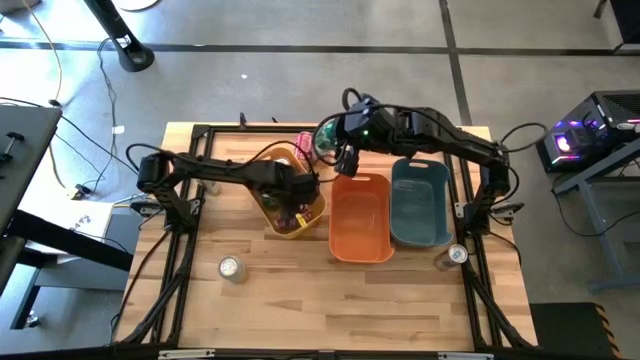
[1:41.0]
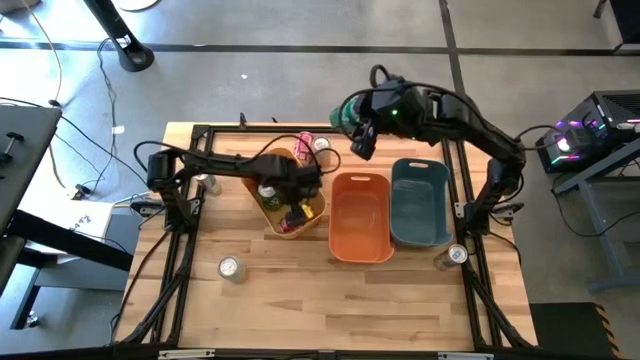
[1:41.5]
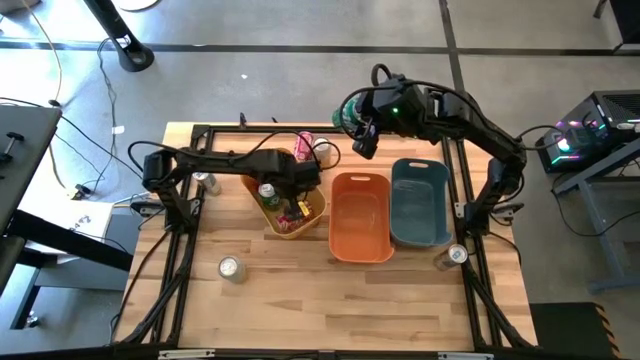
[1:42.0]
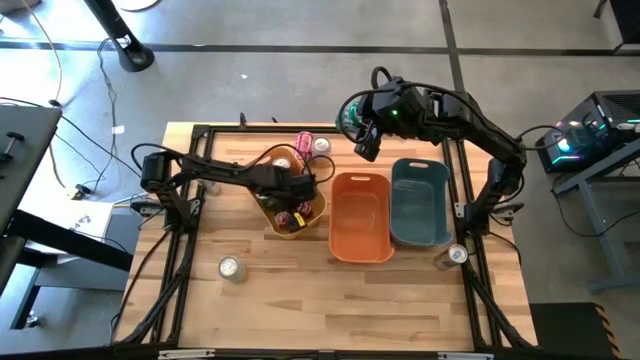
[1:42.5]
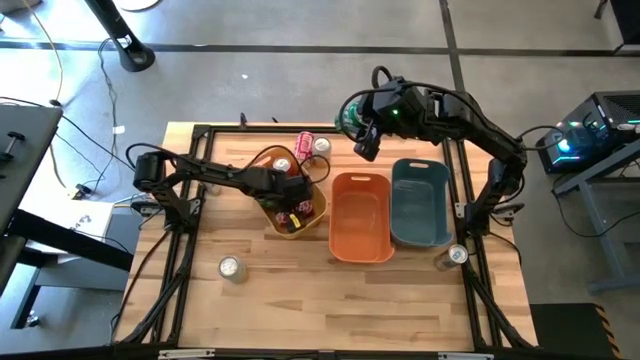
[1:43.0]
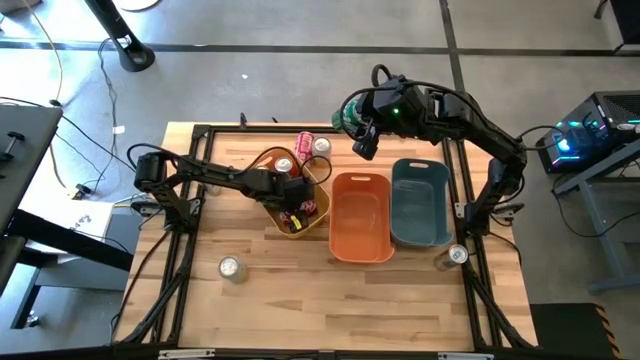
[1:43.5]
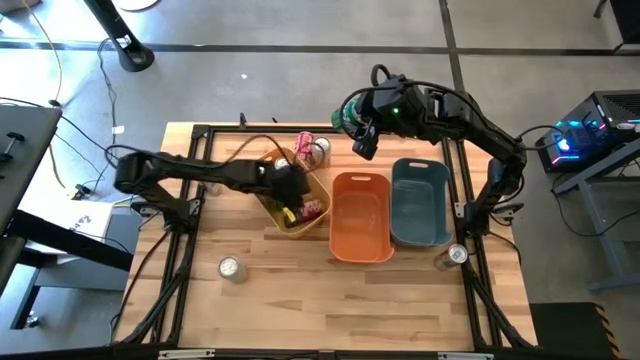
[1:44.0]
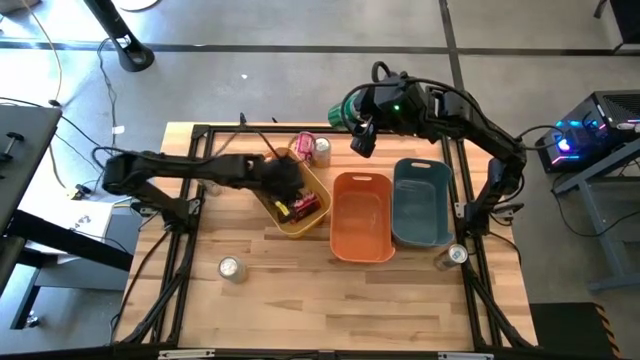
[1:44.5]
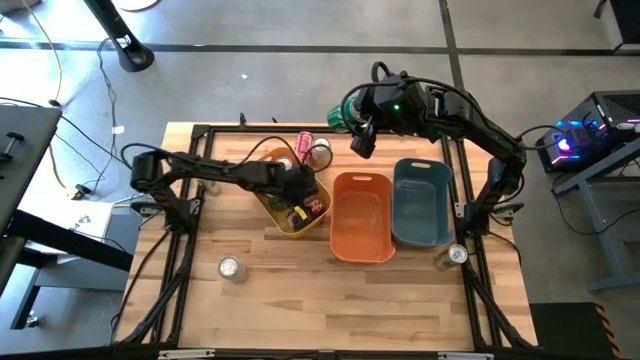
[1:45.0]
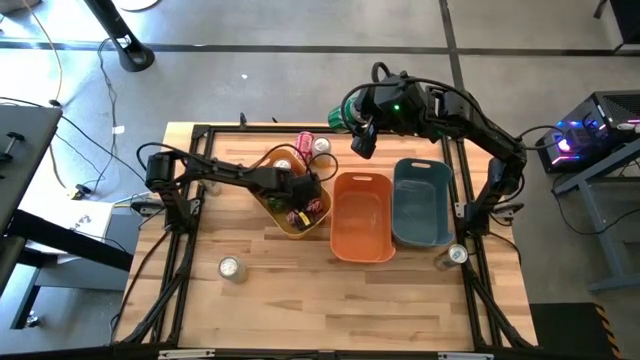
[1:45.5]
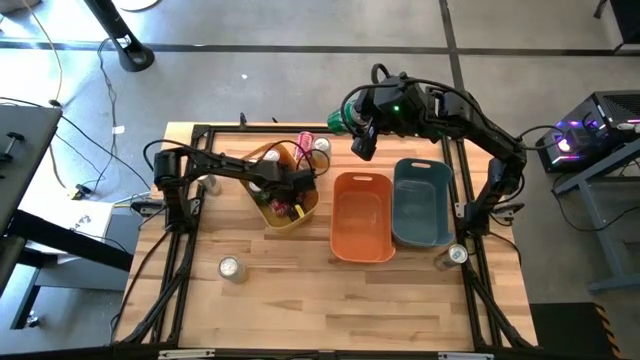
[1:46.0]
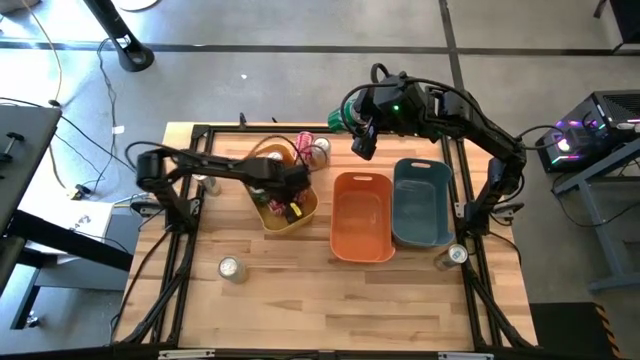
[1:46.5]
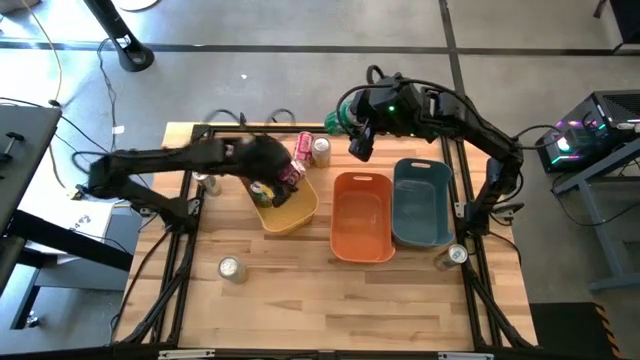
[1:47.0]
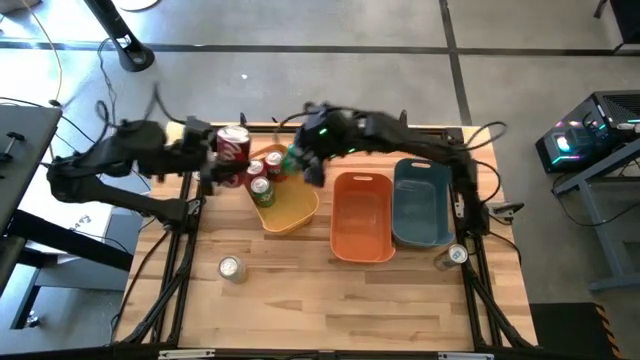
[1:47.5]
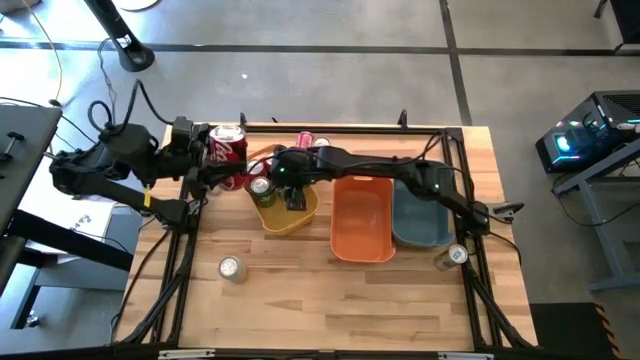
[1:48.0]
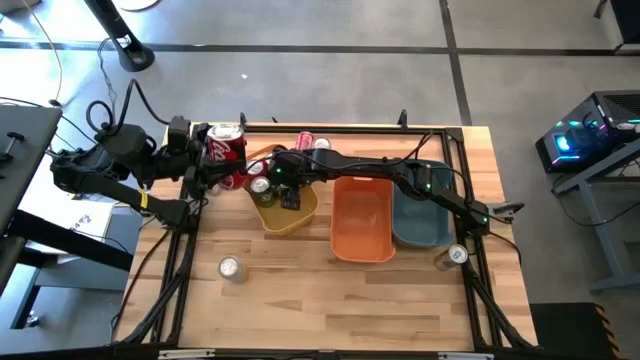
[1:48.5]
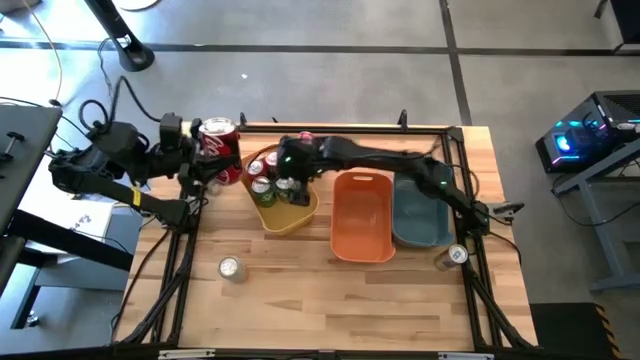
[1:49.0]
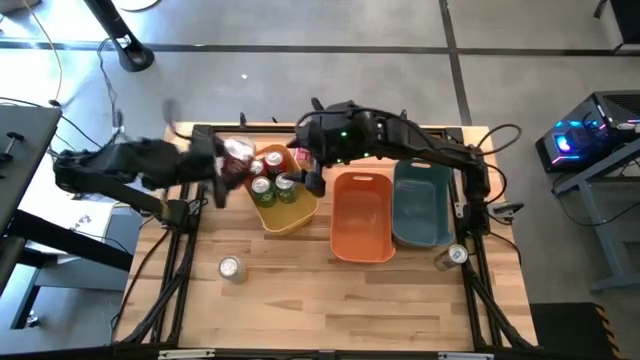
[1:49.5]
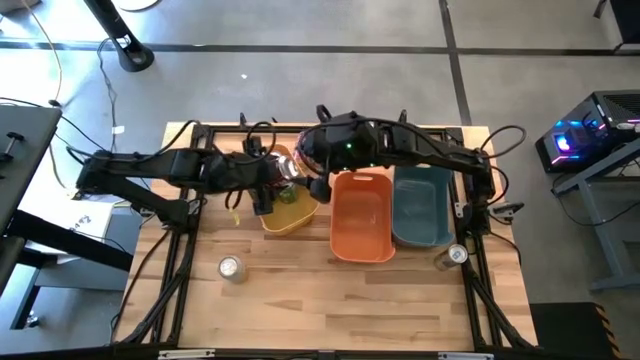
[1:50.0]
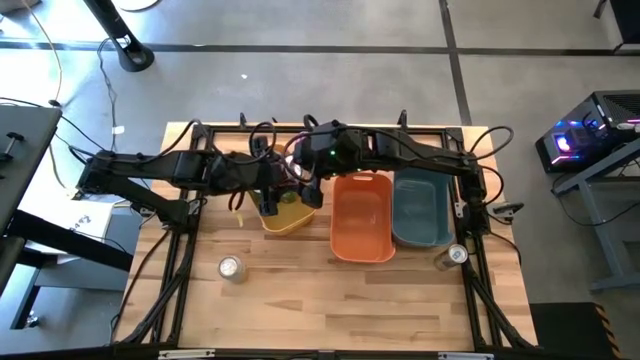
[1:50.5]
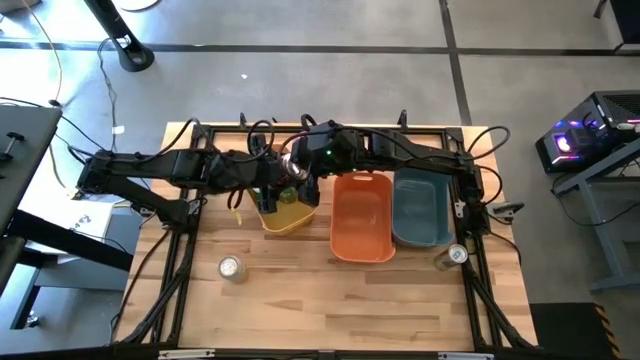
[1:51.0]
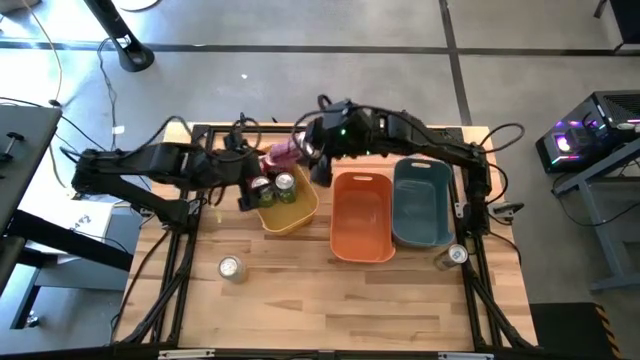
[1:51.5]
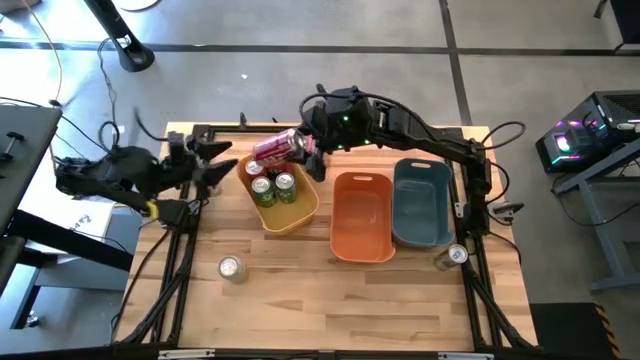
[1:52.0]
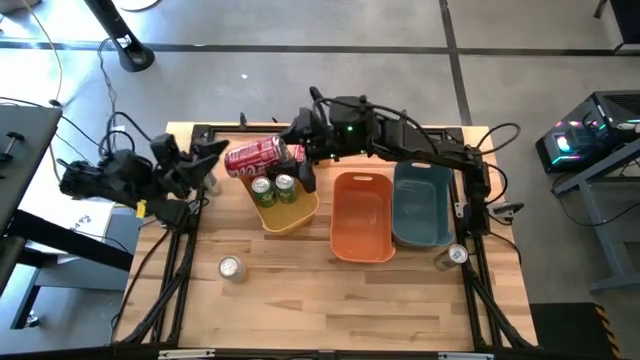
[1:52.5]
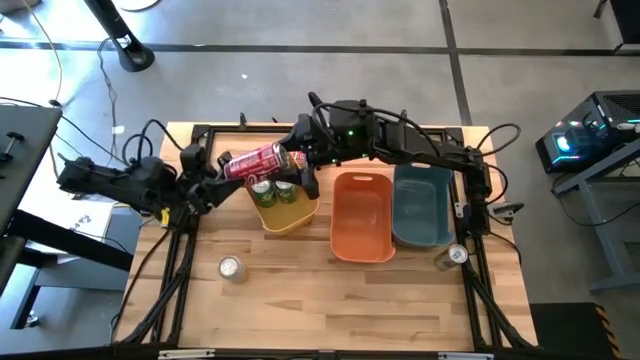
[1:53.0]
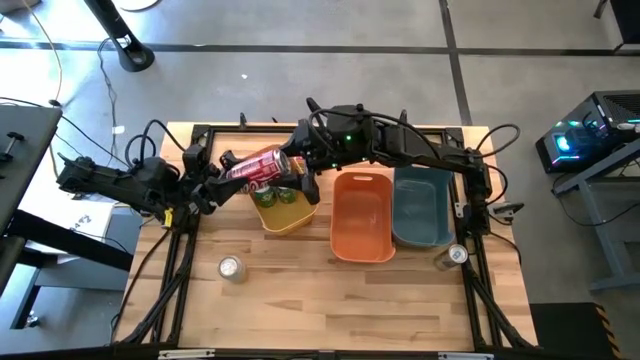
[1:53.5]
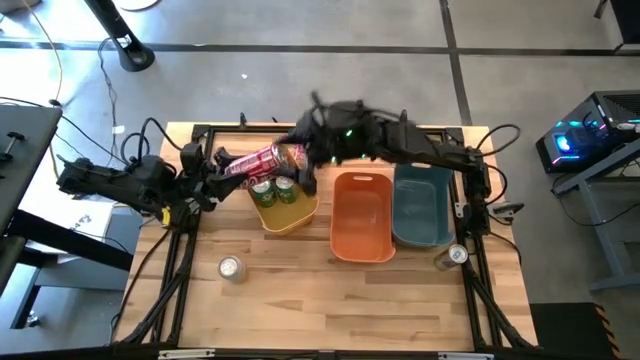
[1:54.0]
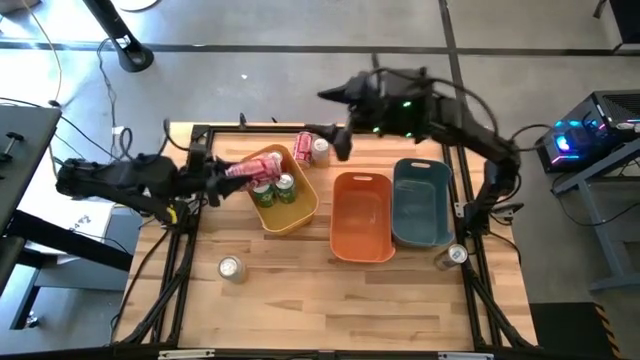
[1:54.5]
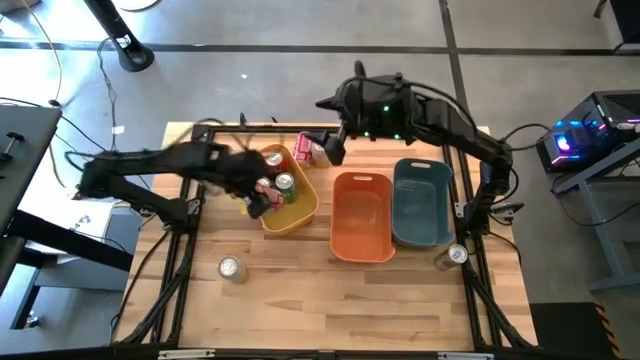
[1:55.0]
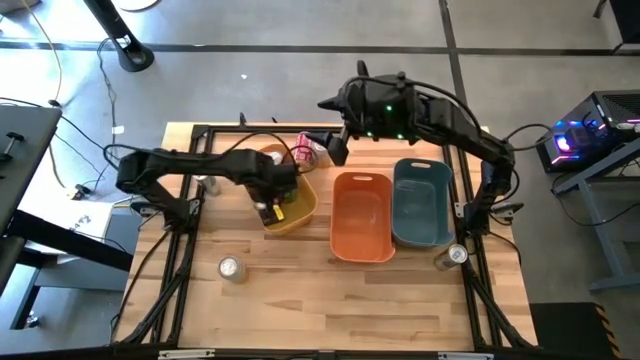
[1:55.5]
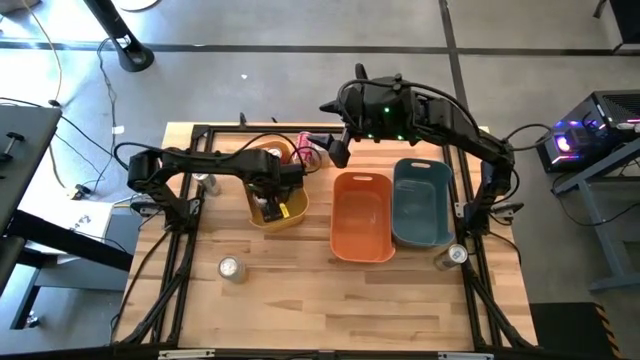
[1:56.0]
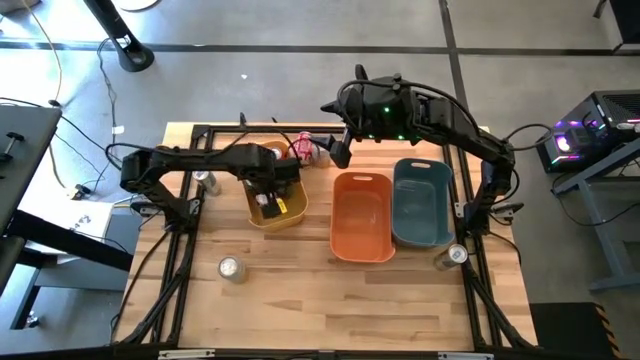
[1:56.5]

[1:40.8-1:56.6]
Task: Sort soda cans
Put the right red-white soda can into the yellow bin

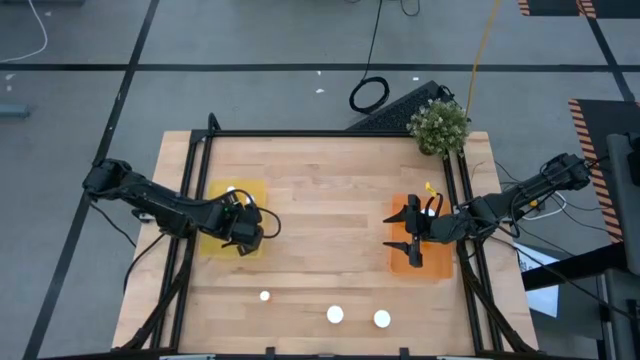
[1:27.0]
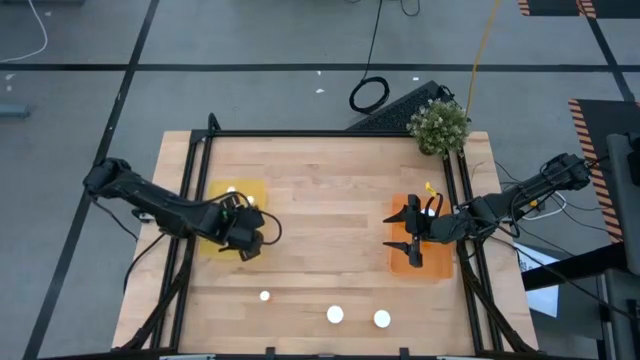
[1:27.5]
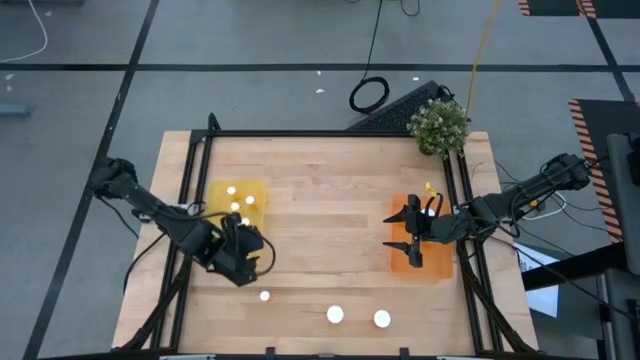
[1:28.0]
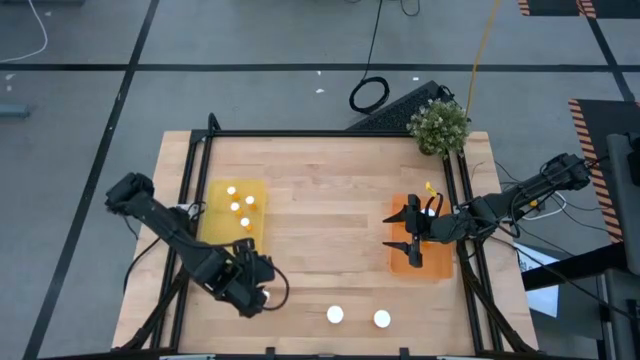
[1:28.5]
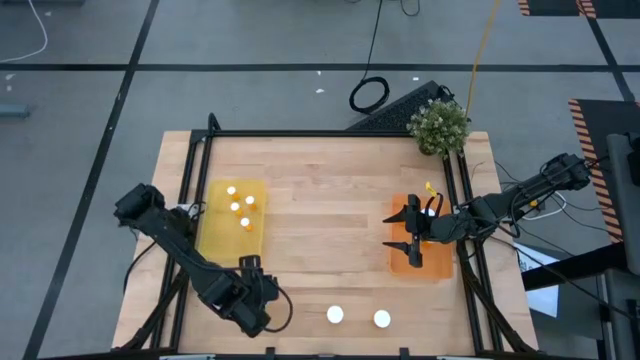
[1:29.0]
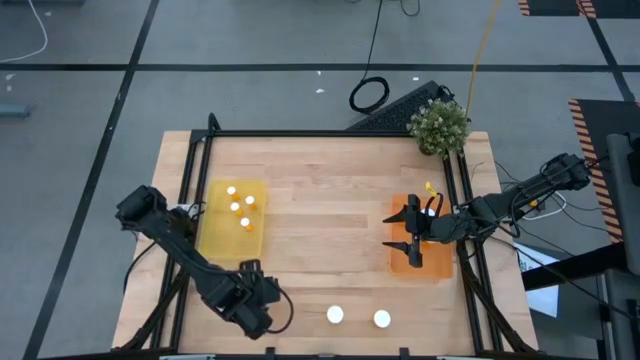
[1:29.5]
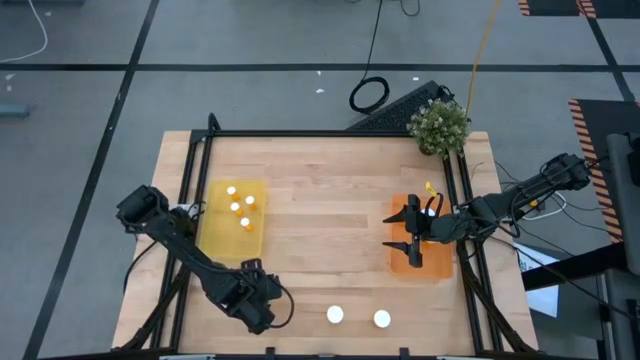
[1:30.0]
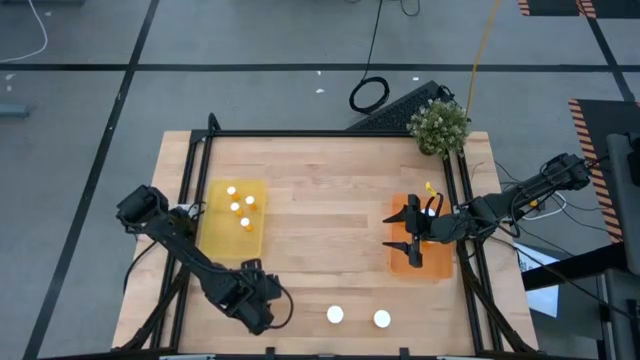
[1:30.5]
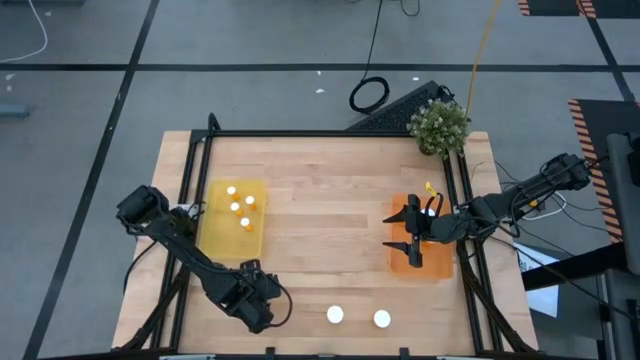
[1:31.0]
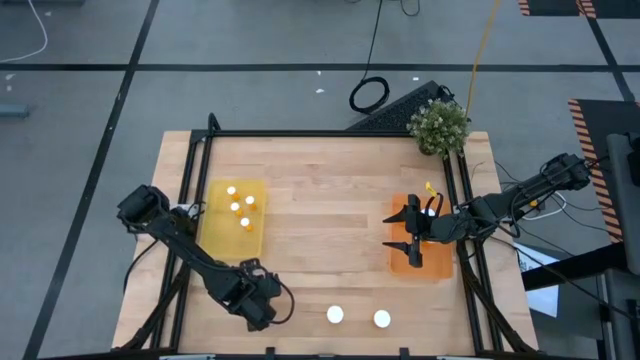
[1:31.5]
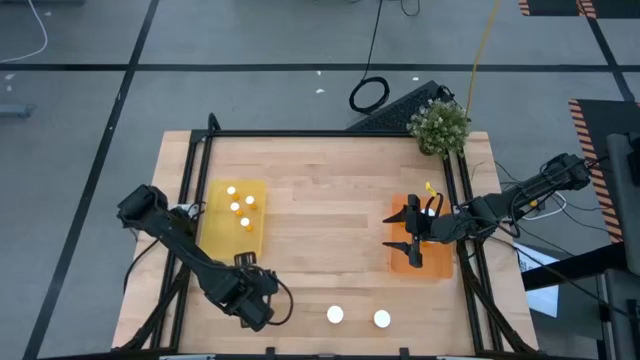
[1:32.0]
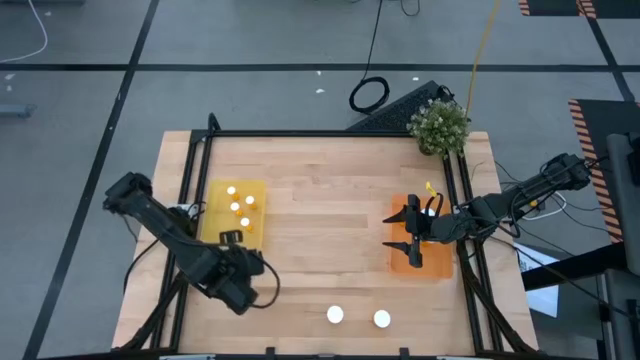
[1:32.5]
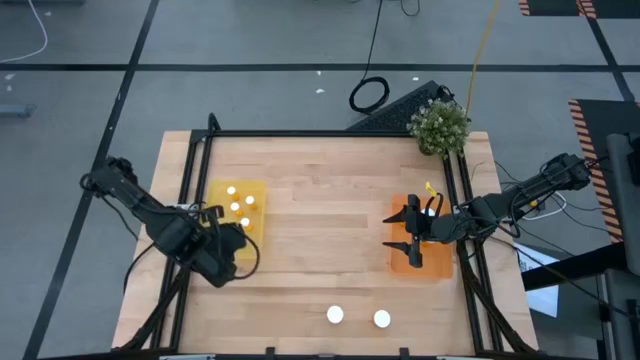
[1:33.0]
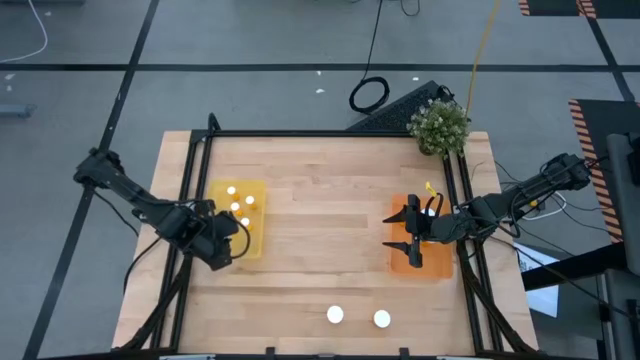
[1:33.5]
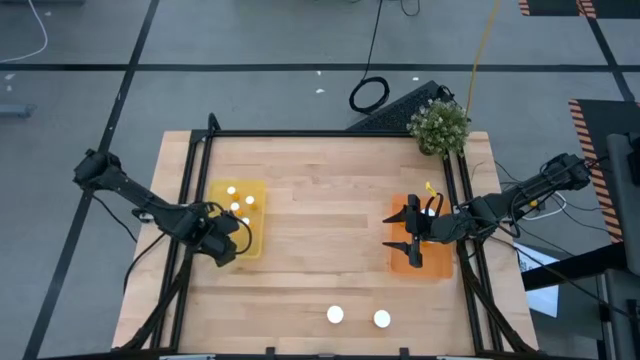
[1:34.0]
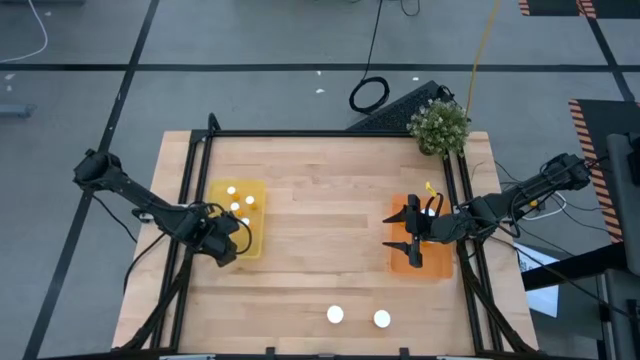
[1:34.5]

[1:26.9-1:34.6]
Task: Pick and place medicine bottles into bin by pill shape (circle, oval)
Put the small orange pill bottle into the yellow bin
